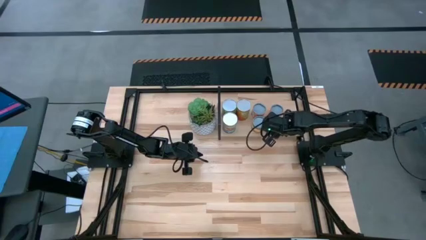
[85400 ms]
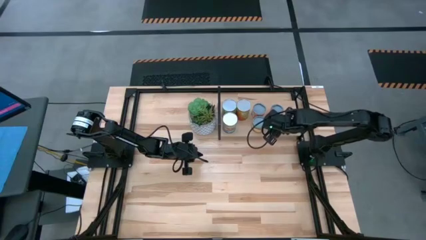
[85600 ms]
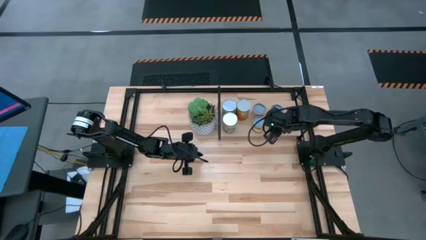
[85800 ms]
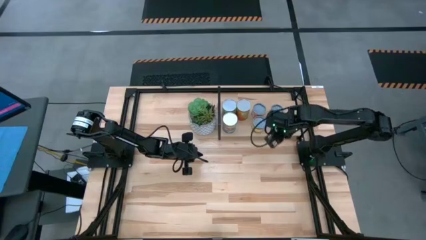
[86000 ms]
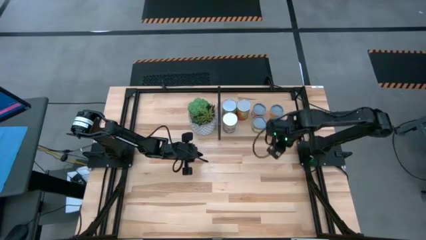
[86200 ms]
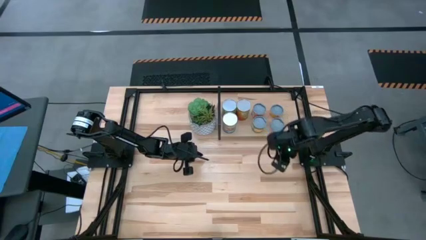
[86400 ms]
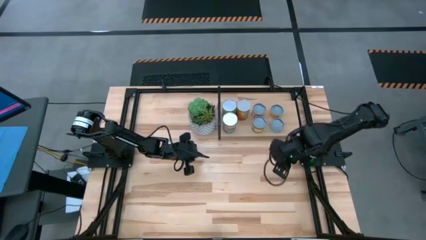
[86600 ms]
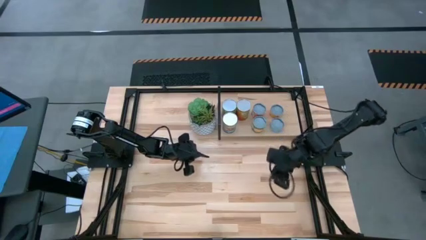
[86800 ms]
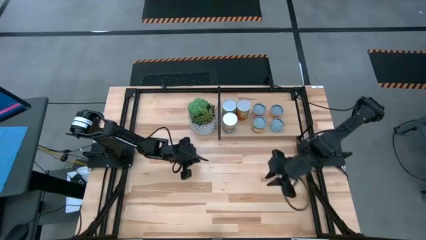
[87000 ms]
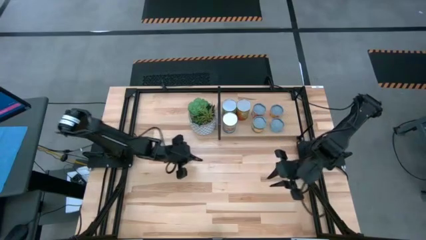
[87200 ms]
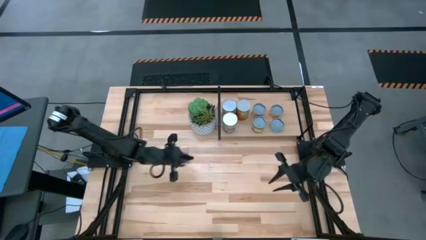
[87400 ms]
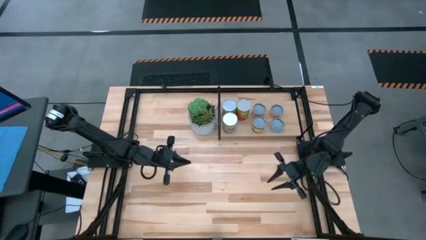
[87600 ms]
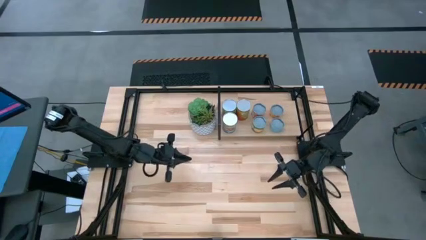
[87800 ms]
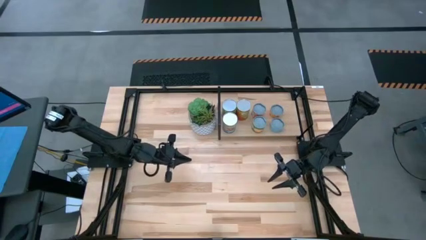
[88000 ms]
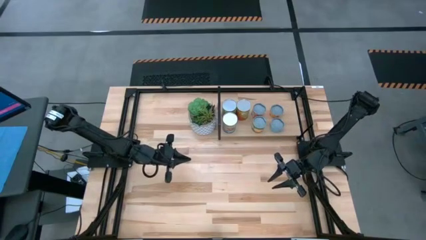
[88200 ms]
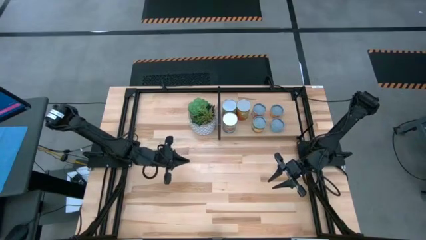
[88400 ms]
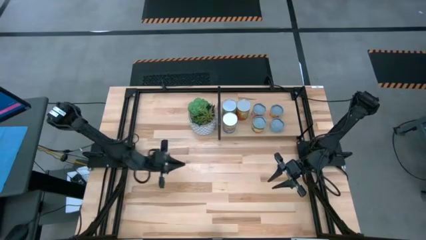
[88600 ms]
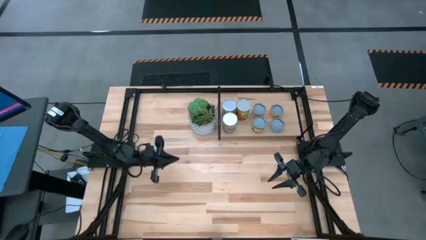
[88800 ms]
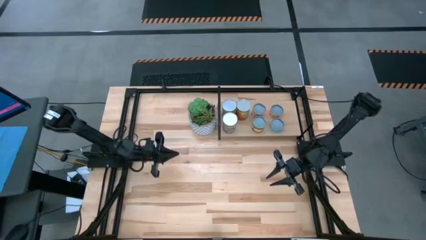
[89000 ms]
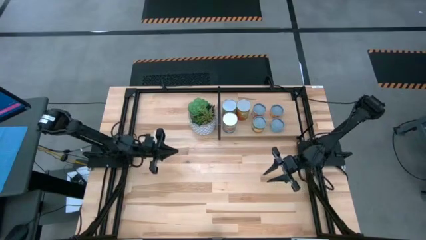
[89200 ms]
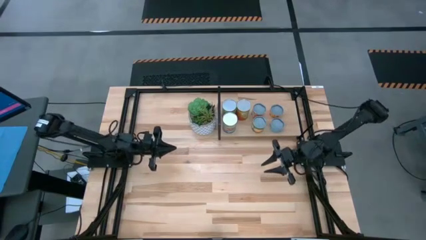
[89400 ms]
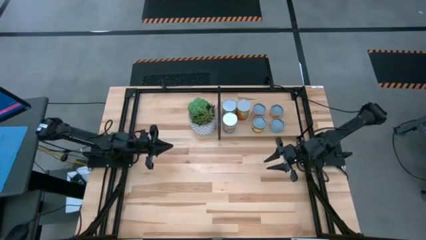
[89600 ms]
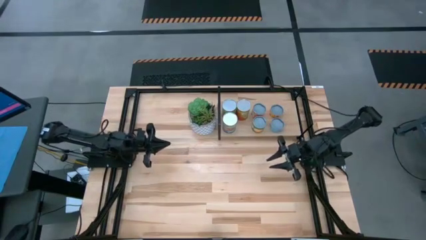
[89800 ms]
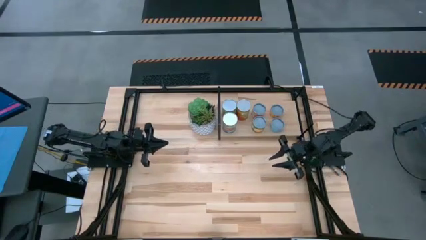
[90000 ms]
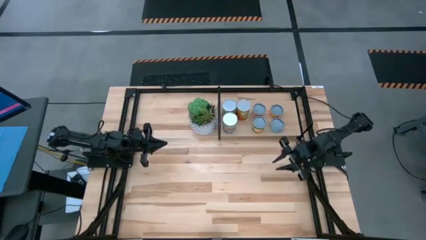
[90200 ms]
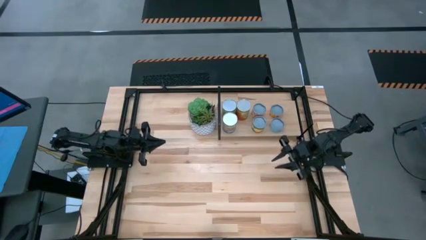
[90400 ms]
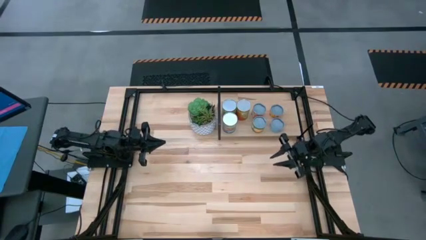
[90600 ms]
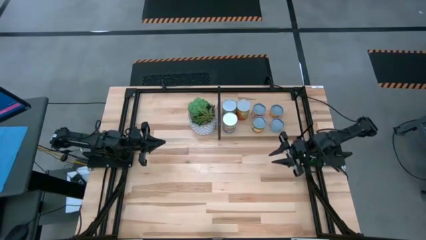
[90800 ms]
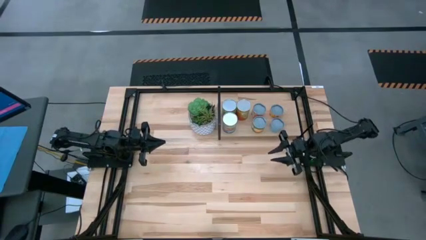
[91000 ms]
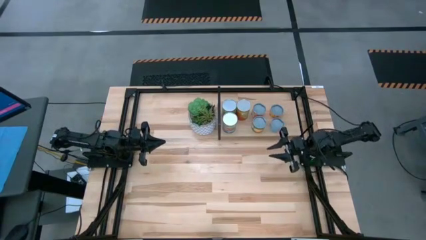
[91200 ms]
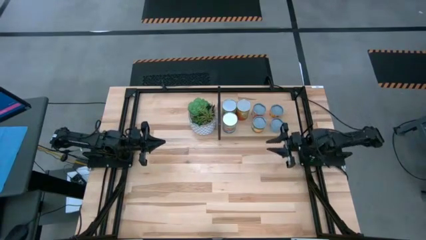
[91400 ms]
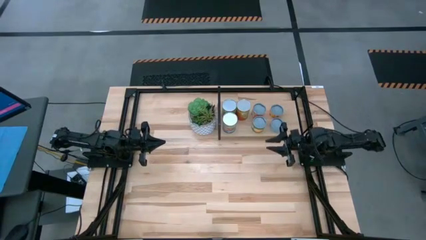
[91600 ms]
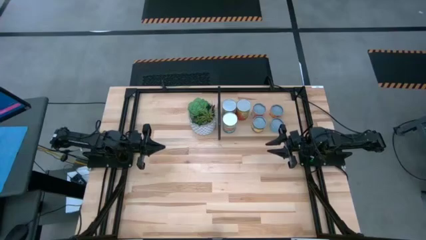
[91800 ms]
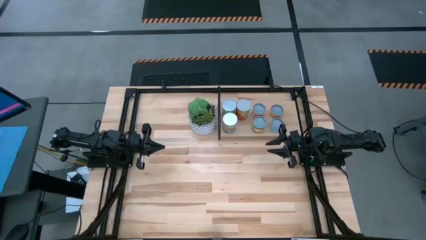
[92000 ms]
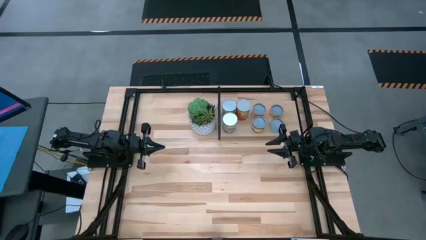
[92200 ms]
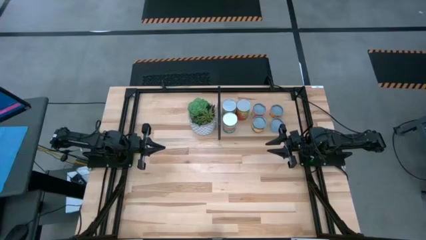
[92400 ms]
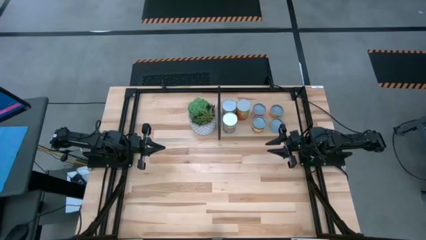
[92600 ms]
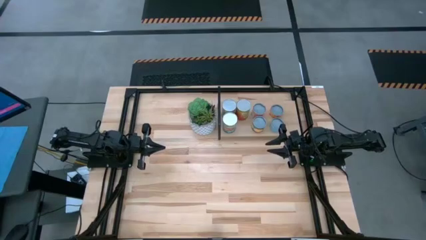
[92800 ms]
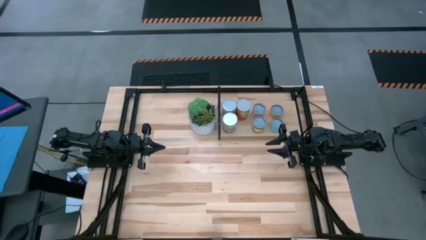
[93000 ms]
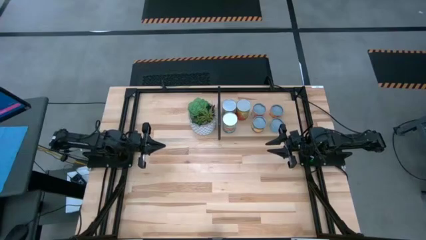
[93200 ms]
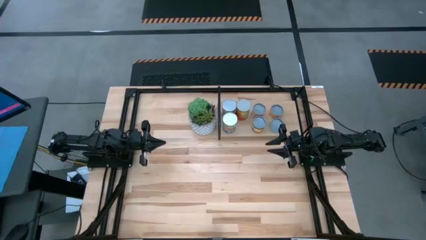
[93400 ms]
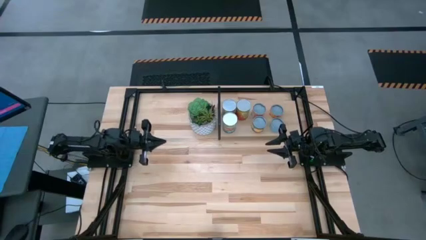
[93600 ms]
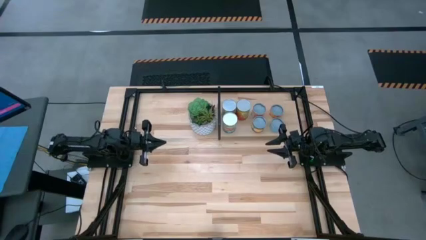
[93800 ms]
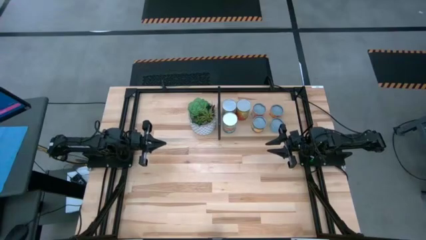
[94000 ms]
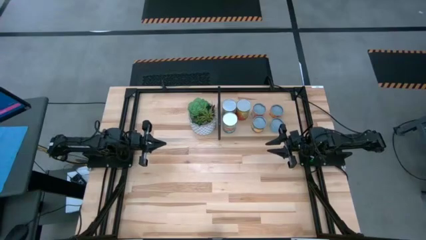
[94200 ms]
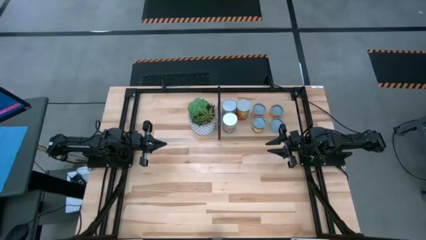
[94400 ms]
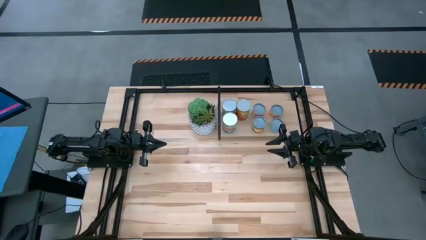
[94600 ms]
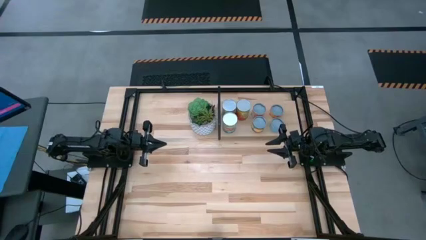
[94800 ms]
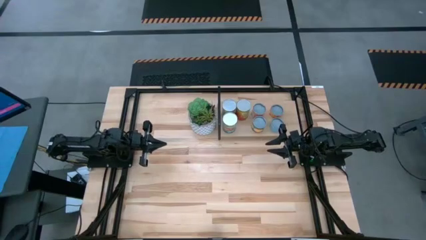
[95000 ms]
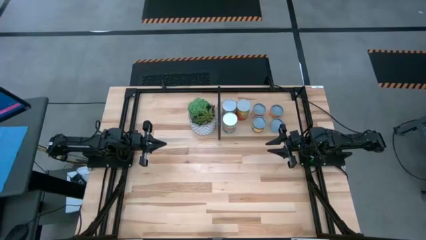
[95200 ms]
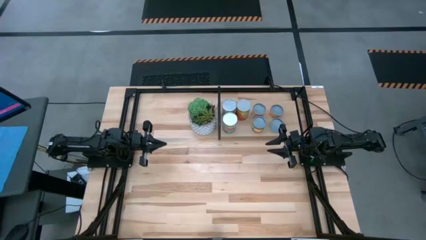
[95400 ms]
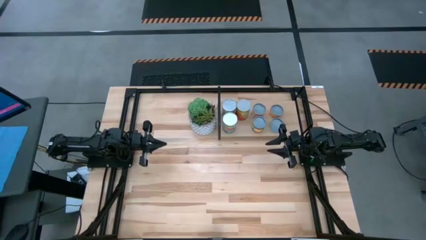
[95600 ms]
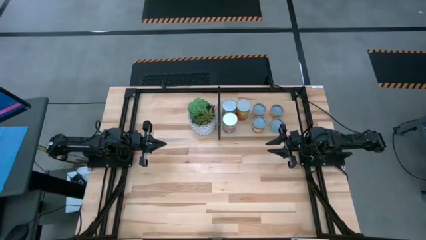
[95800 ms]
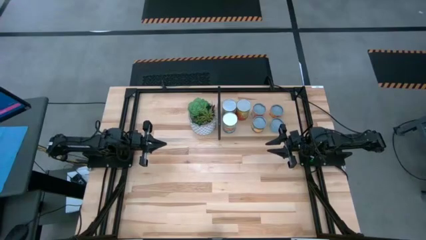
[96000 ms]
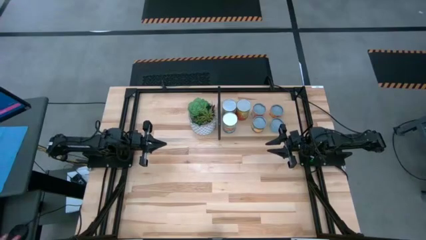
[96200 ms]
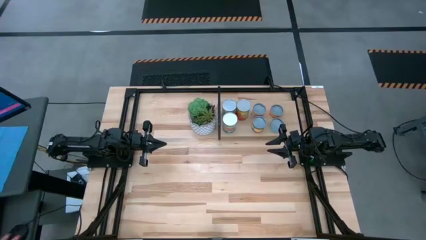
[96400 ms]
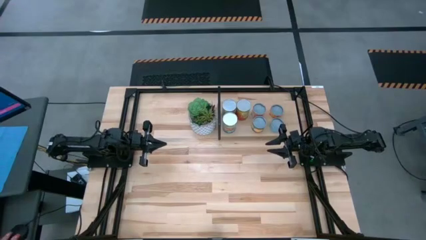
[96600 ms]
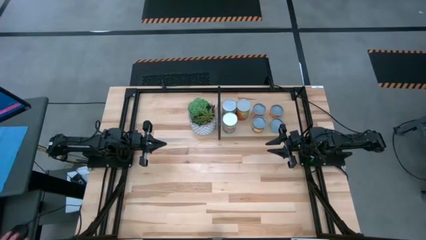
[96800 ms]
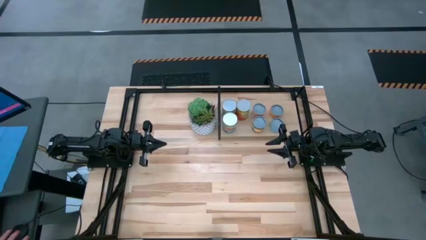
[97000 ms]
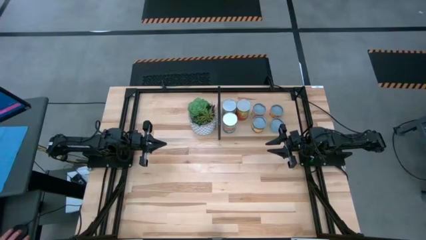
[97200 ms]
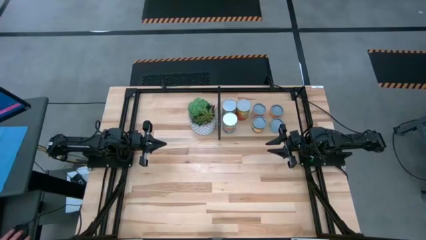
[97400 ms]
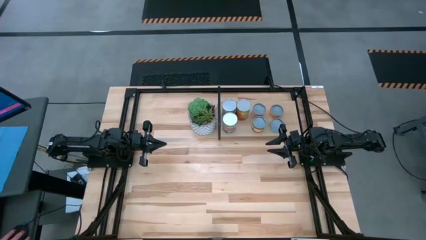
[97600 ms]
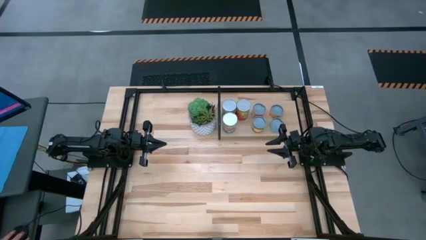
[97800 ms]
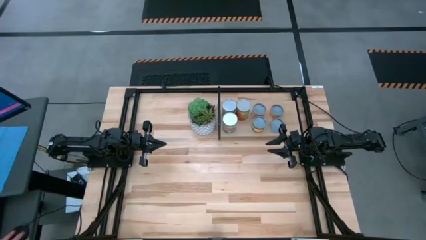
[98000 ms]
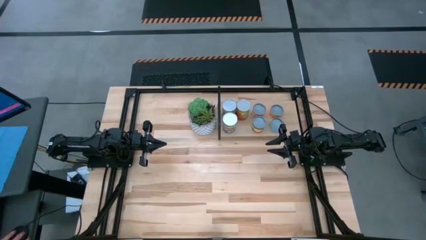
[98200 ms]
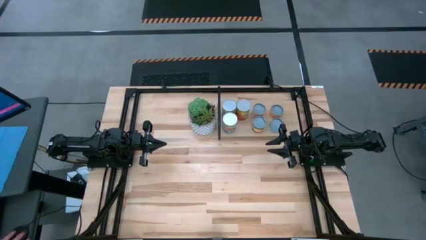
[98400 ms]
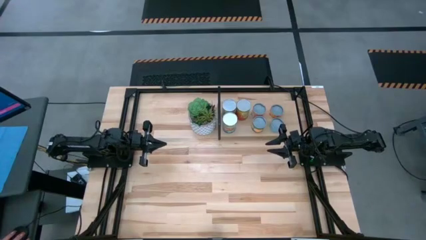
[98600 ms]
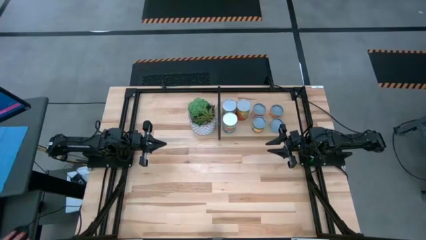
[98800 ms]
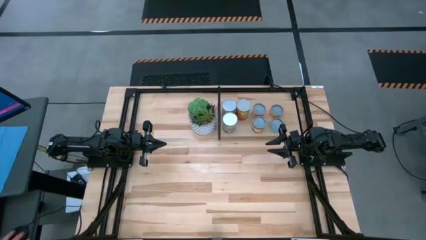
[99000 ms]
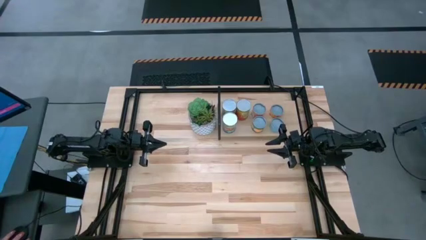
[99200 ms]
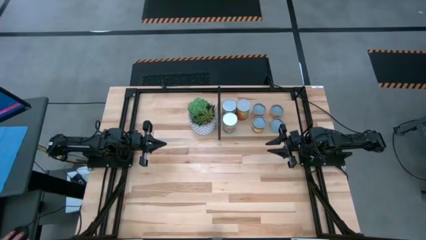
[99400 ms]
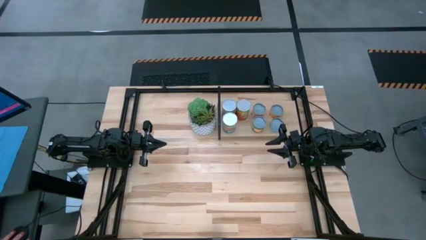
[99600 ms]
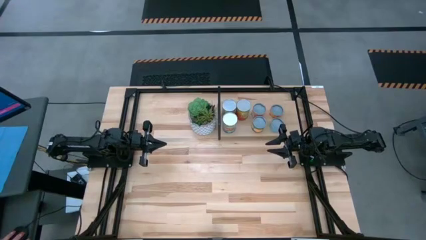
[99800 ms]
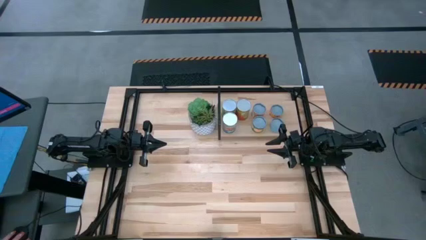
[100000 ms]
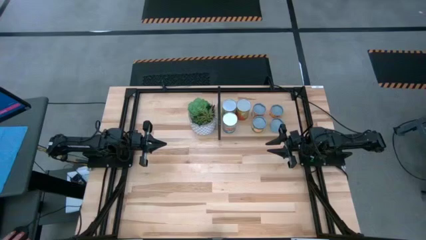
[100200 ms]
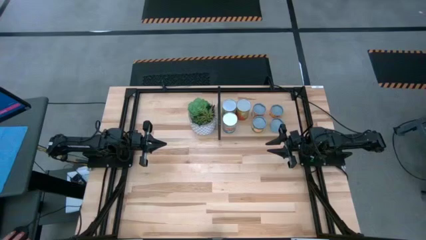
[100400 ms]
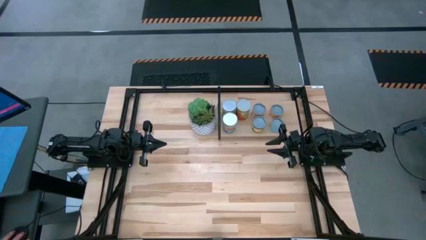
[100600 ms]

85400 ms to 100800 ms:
Task: Pick and place cans onto a shelf
Return to Home Position
